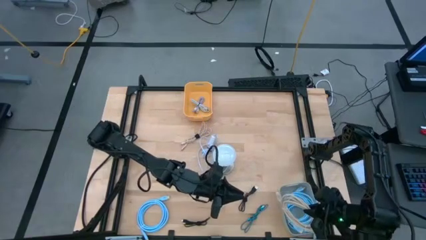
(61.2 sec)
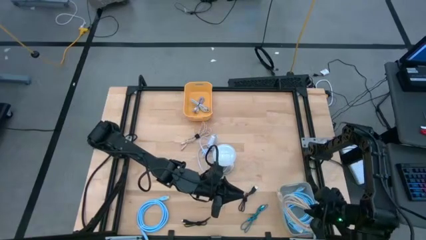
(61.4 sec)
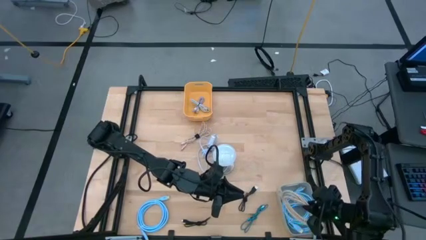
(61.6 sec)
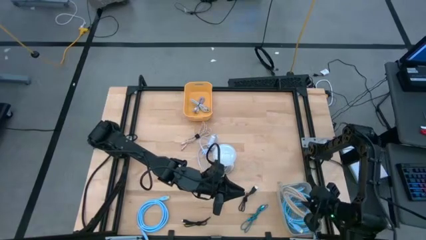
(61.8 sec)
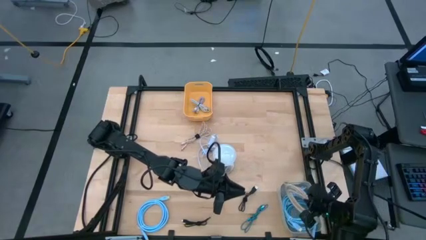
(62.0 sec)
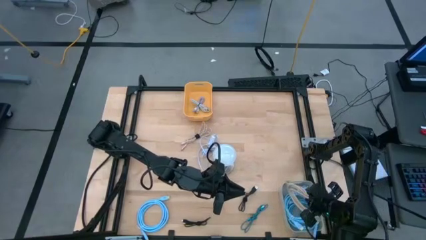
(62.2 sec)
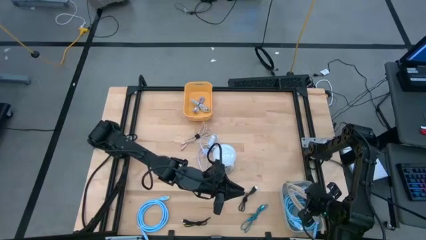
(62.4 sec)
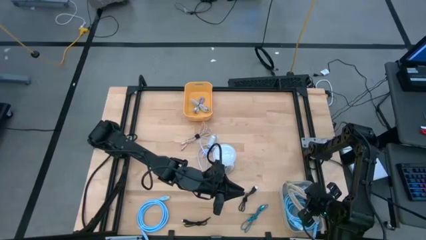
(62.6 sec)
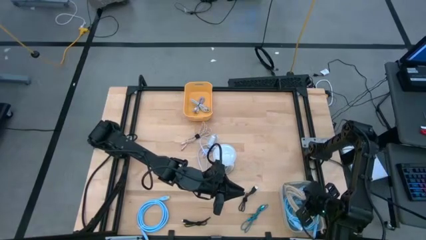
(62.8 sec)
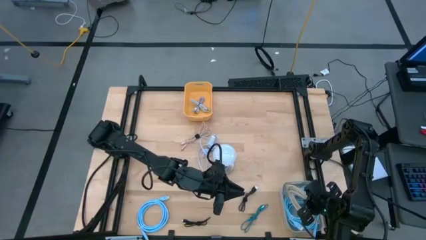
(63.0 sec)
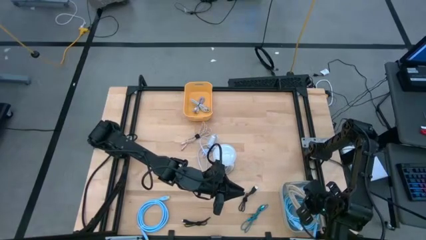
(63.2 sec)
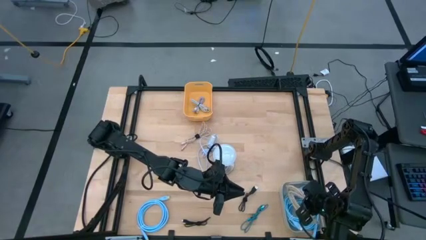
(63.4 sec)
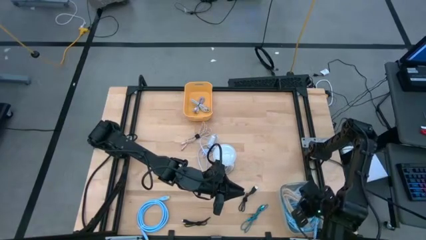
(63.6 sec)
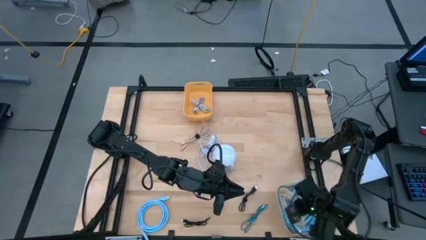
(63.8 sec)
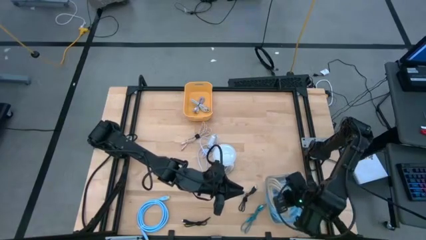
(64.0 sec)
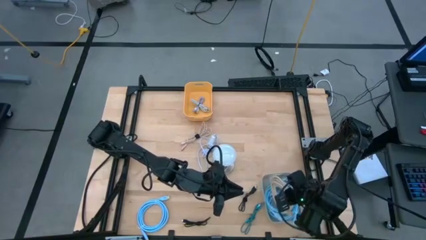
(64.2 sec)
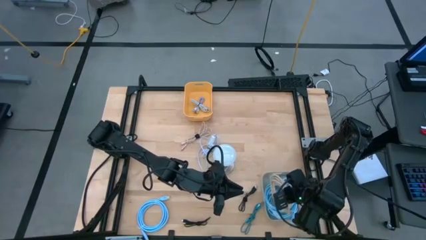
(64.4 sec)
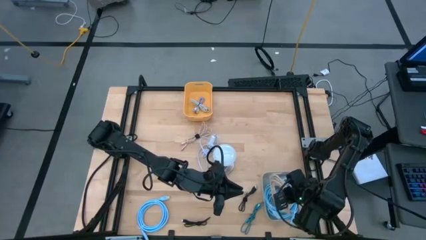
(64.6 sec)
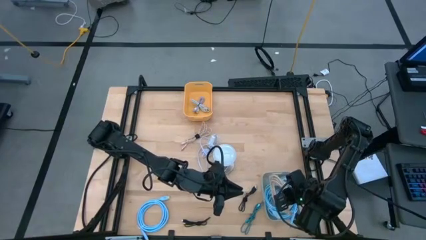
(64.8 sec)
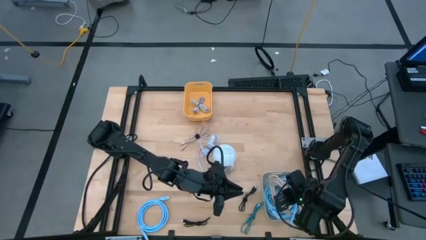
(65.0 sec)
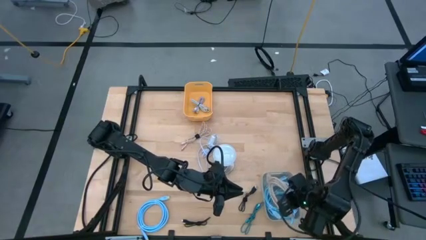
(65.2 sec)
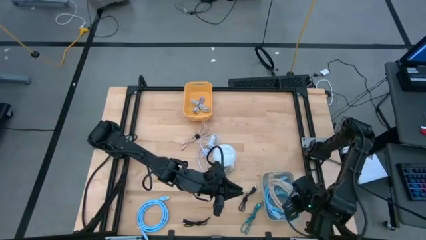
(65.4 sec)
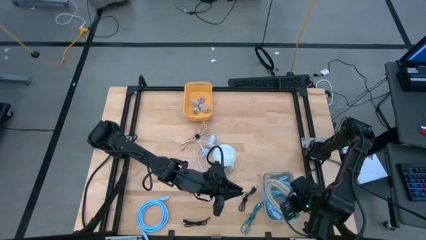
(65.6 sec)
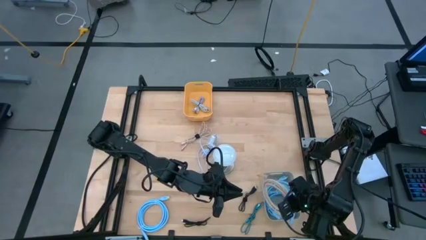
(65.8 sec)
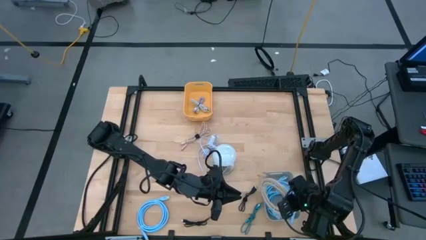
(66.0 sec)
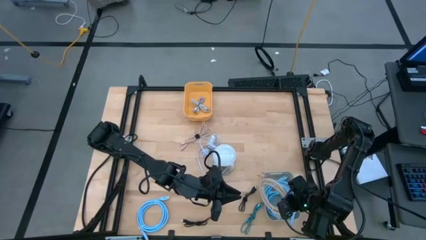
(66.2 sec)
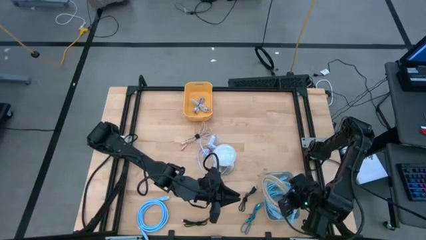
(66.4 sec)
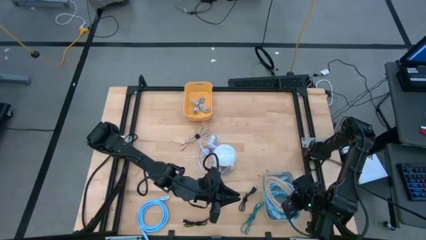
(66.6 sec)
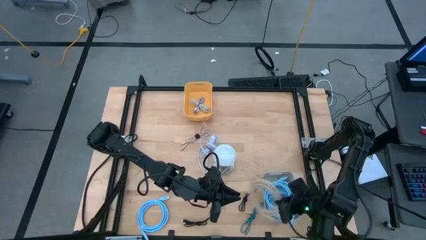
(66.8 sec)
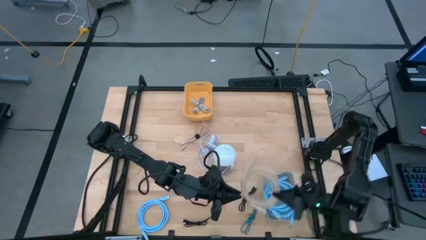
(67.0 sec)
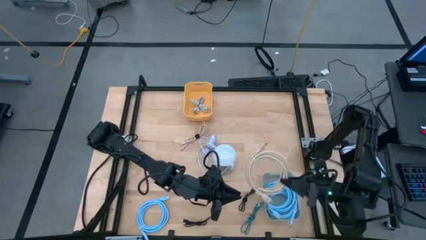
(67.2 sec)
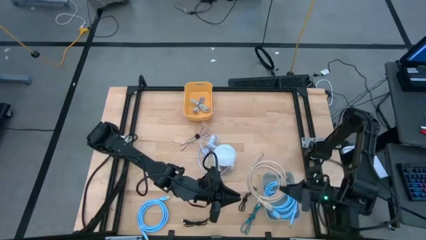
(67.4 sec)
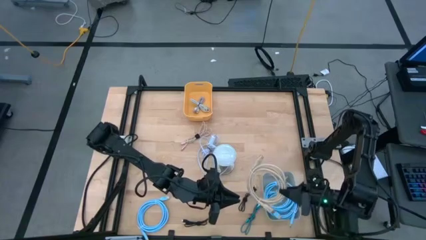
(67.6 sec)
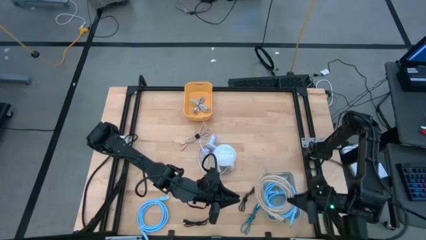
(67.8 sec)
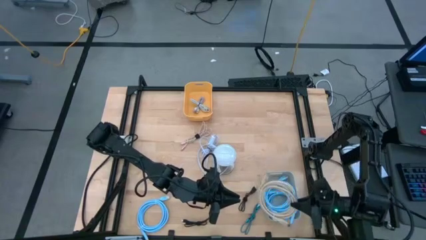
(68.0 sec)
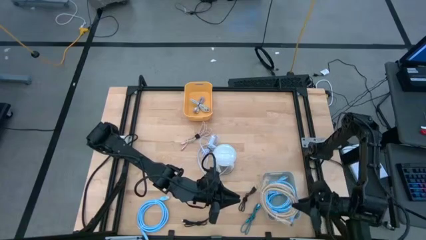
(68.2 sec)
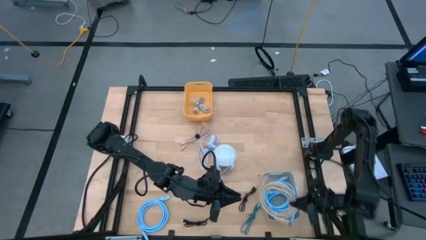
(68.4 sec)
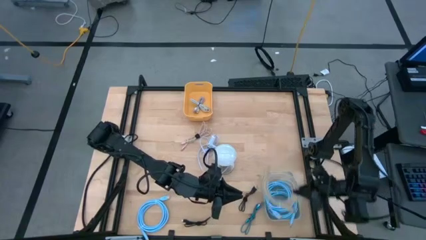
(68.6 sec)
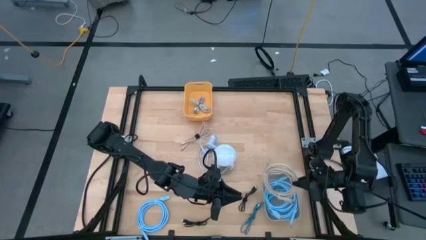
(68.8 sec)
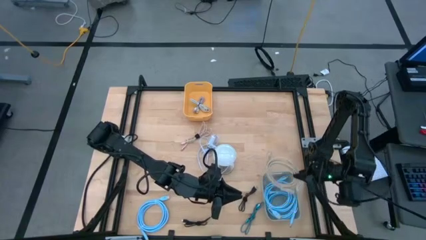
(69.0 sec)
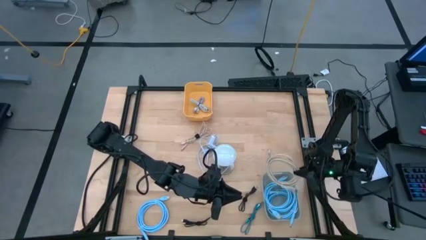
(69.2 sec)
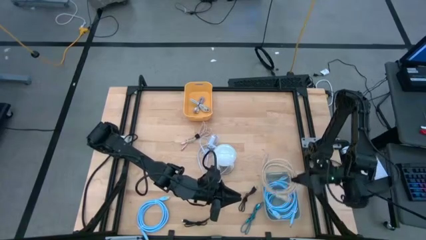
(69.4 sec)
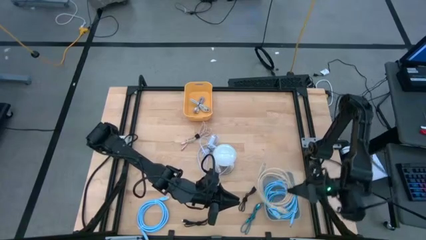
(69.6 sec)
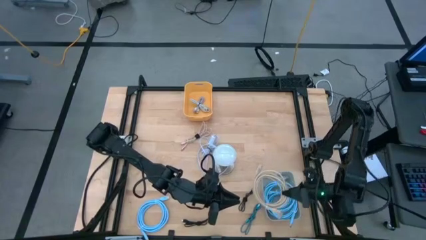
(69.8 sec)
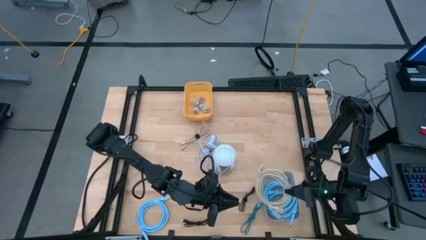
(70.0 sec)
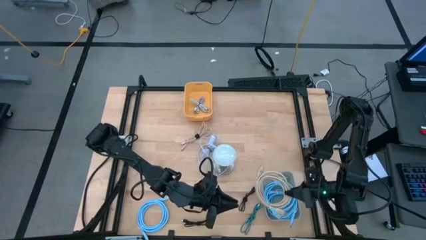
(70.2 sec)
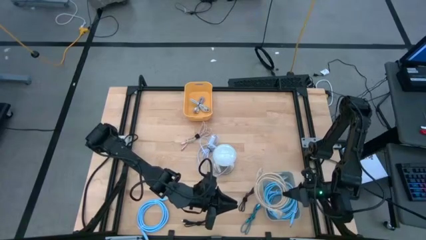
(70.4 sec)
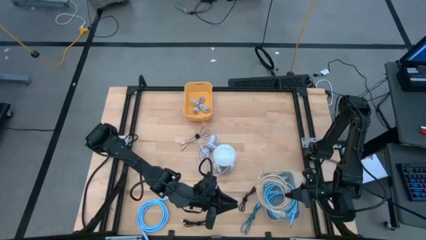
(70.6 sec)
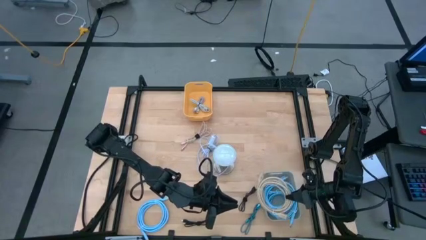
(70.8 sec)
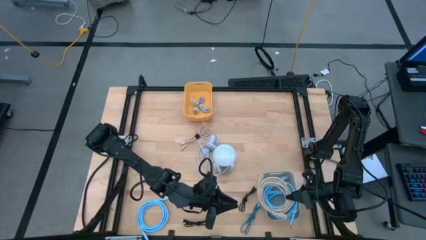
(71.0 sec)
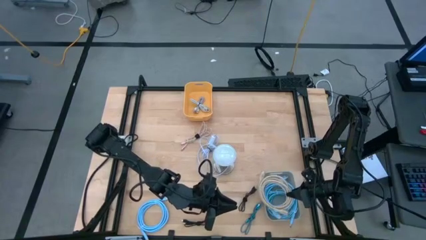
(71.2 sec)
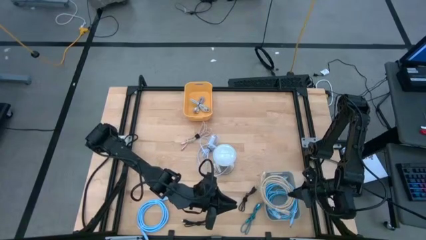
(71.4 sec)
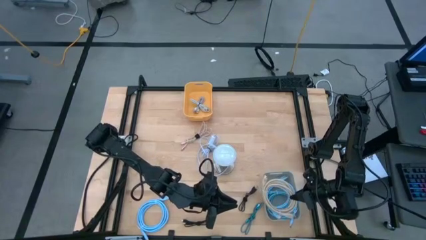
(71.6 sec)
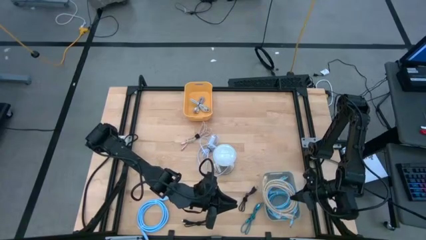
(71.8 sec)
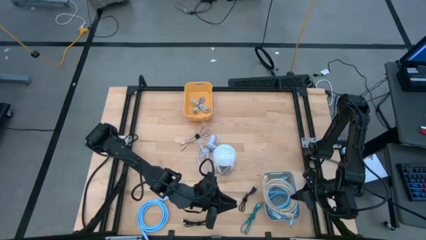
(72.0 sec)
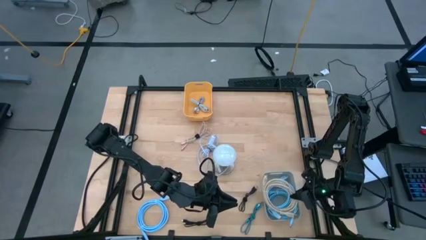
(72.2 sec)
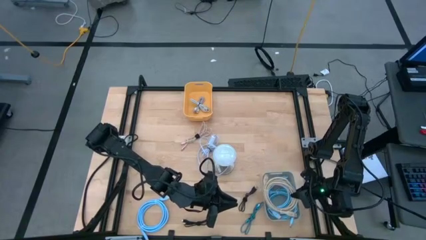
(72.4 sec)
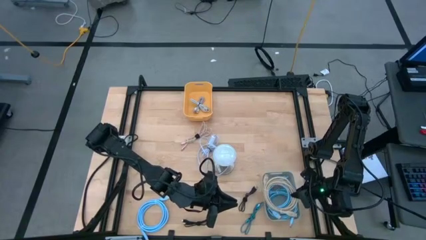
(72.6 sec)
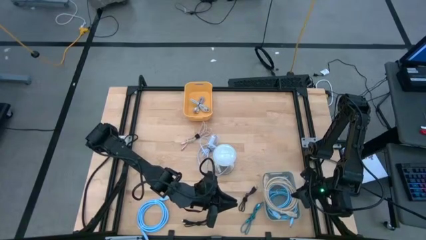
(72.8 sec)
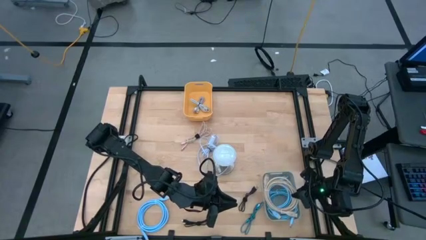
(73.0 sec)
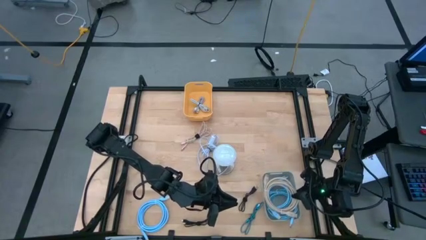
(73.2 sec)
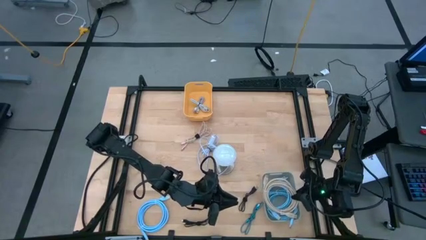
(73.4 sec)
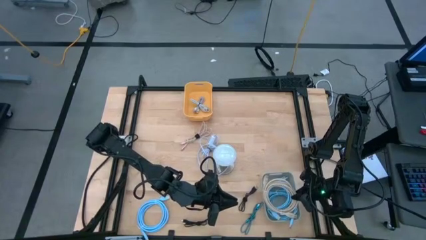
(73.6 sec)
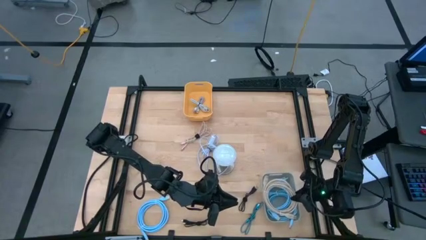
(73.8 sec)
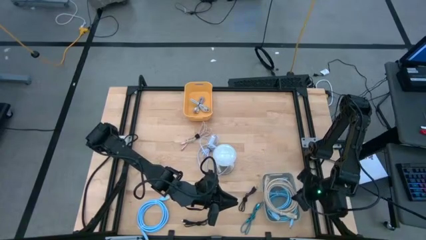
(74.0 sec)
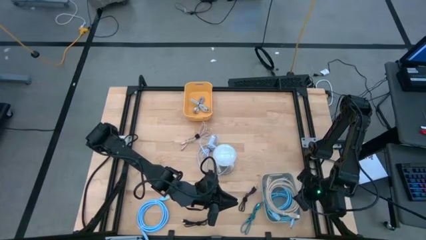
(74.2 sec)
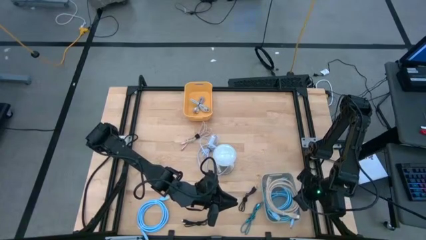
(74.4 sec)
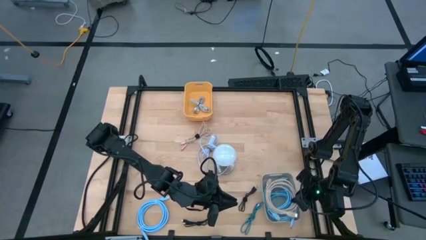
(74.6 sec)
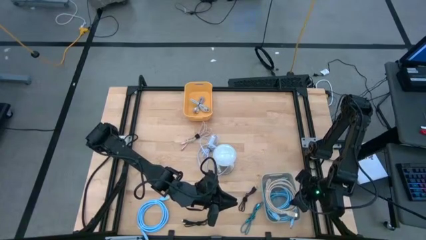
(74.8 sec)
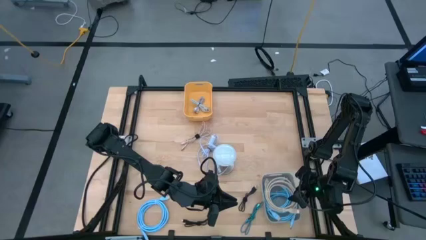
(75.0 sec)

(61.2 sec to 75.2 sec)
Task: Pick & Place USB Port
Put the brown HDMI cable into the gray bin

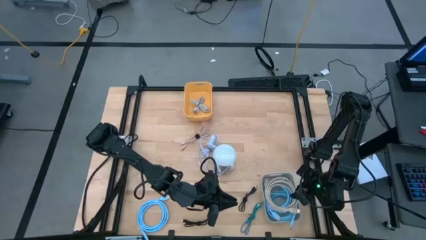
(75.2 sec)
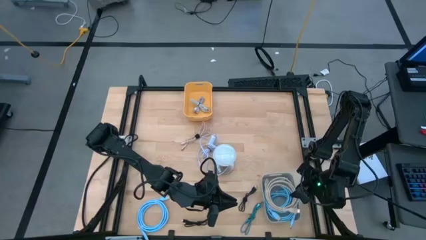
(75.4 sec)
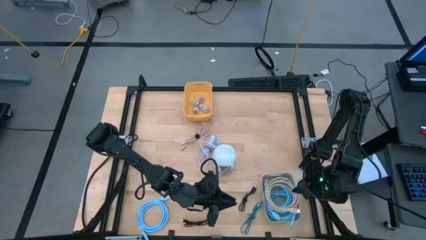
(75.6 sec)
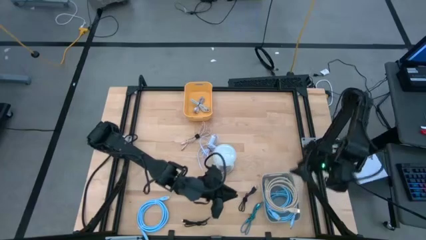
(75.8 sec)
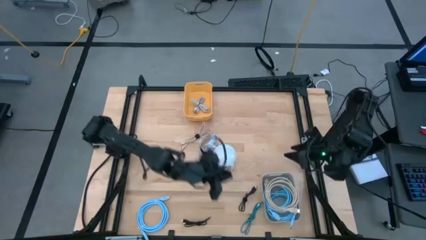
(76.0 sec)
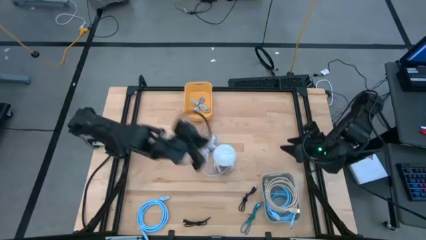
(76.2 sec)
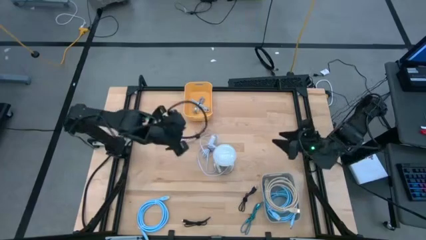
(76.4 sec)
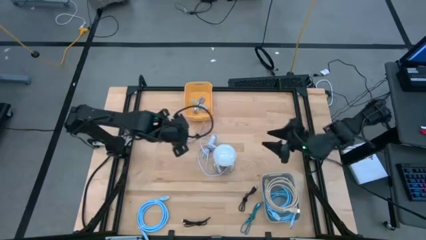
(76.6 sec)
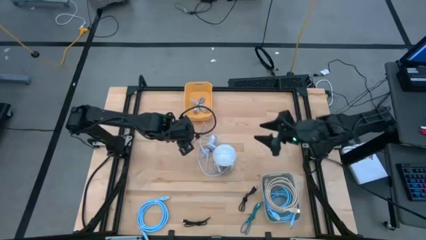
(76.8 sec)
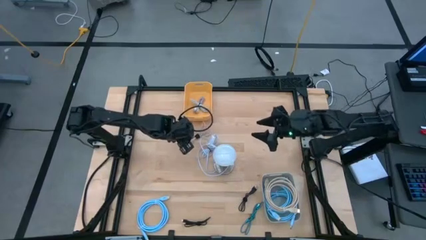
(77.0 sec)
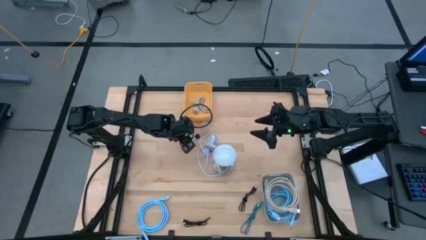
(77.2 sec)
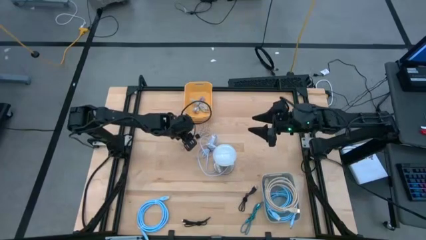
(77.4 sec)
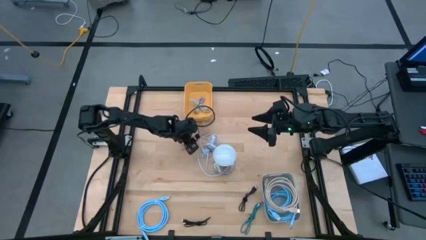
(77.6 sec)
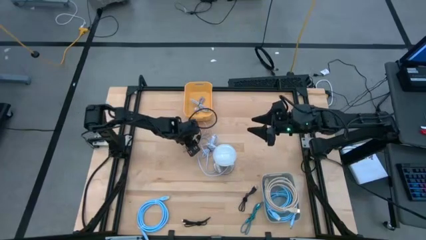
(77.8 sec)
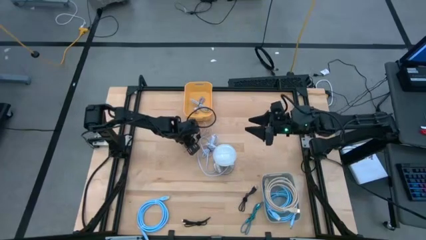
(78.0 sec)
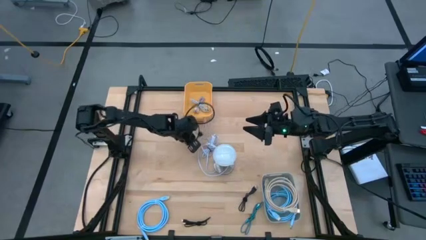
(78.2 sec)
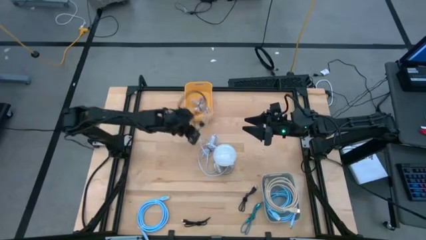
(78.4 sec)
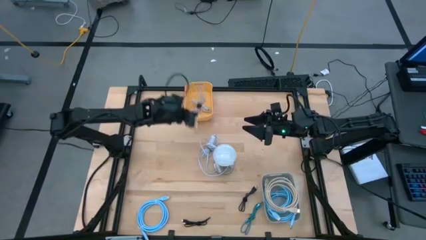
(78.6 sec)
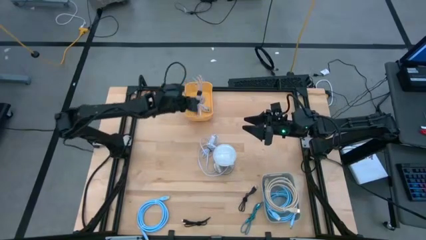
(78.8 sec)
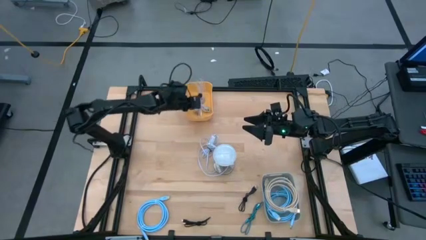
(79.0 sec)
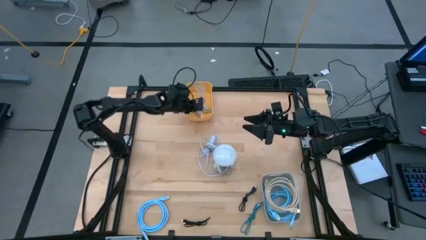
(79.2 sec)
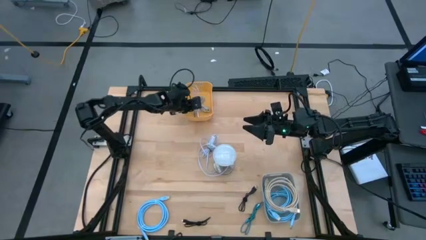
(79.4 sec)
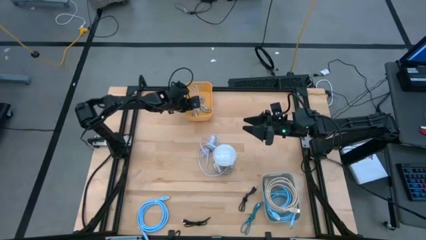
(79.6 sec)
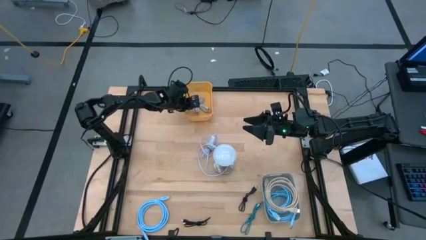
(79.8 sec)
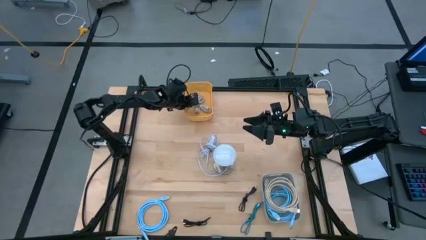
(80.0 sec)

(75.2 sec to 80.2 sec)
Put the brown charger cable into the yellow bin
